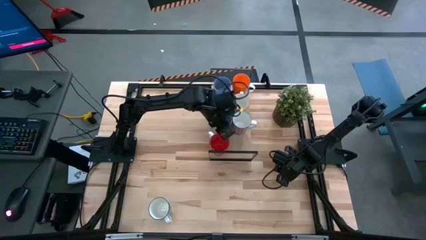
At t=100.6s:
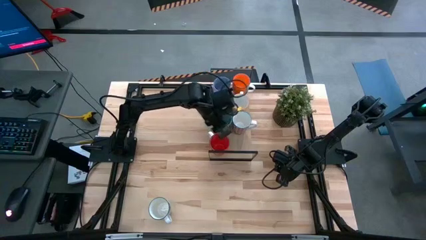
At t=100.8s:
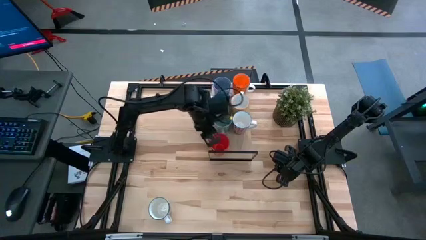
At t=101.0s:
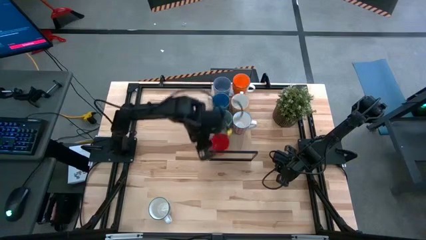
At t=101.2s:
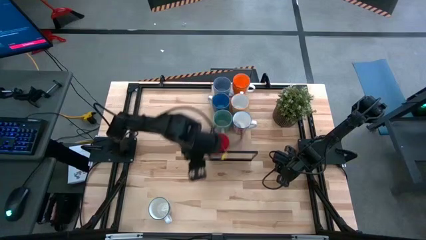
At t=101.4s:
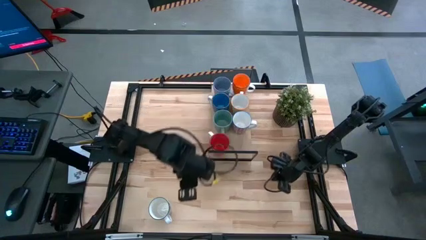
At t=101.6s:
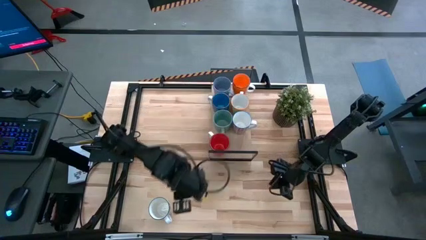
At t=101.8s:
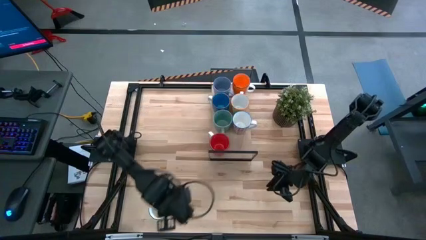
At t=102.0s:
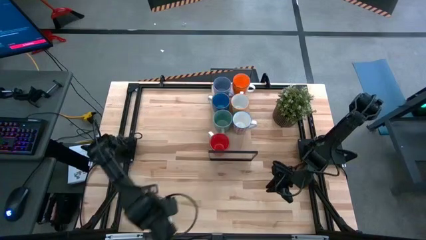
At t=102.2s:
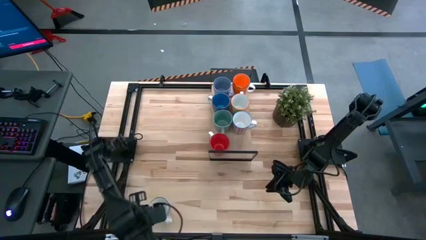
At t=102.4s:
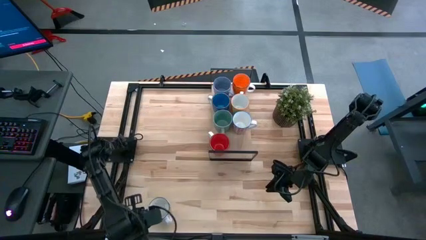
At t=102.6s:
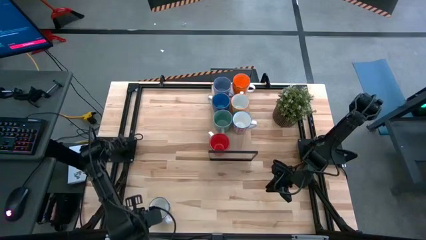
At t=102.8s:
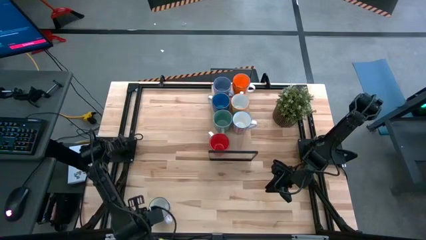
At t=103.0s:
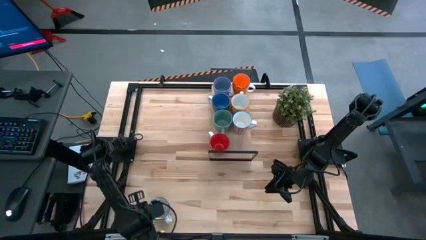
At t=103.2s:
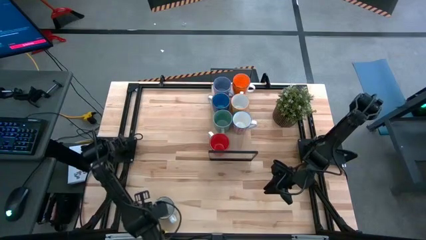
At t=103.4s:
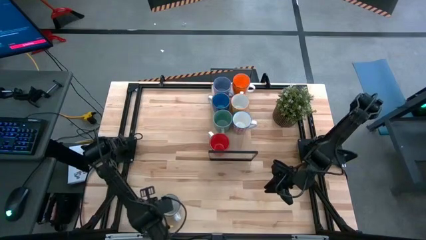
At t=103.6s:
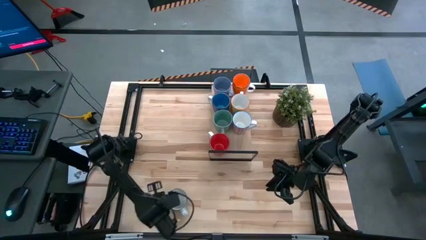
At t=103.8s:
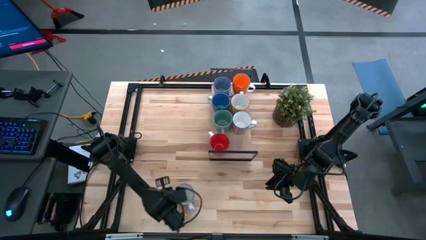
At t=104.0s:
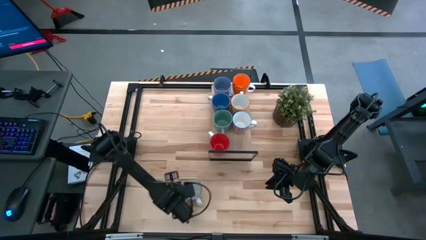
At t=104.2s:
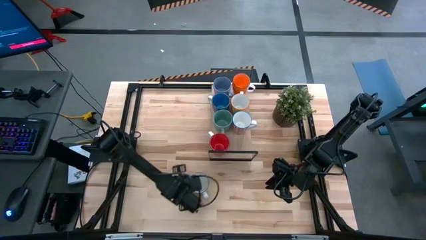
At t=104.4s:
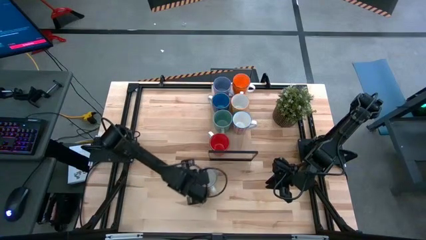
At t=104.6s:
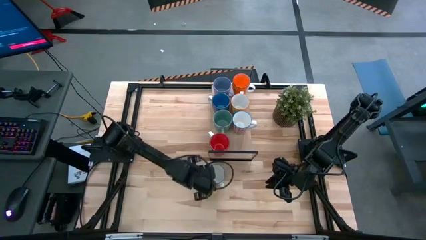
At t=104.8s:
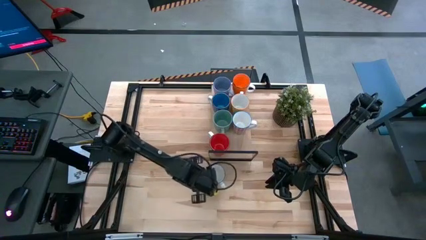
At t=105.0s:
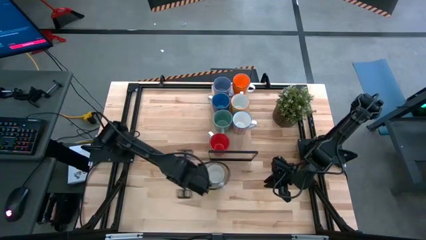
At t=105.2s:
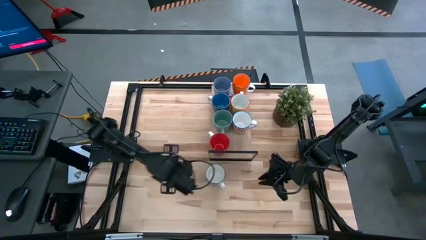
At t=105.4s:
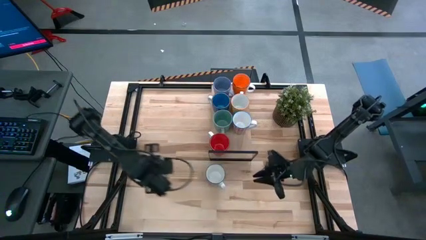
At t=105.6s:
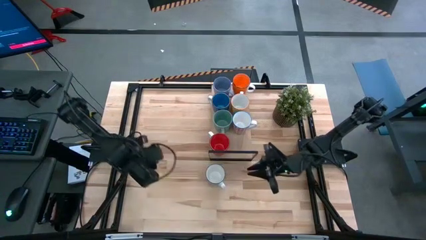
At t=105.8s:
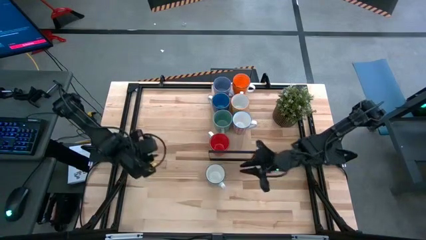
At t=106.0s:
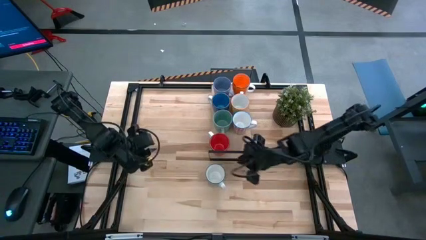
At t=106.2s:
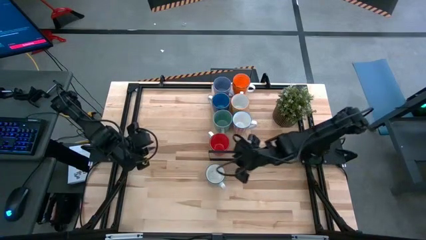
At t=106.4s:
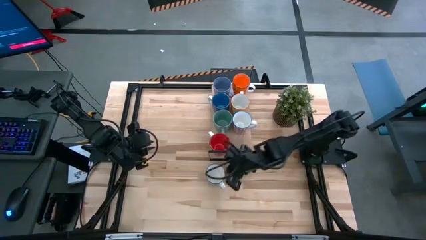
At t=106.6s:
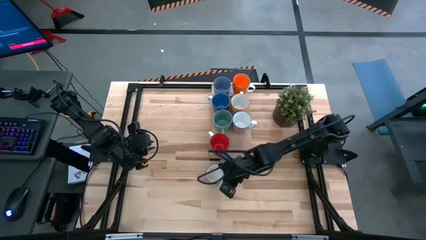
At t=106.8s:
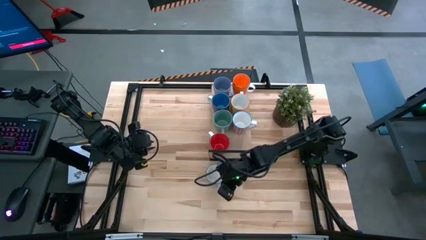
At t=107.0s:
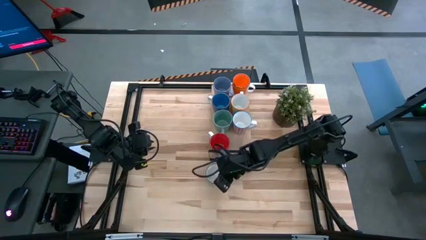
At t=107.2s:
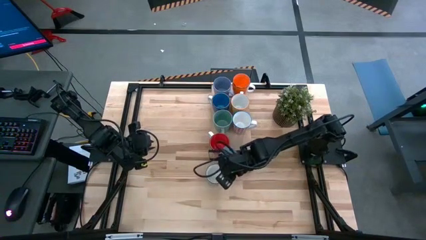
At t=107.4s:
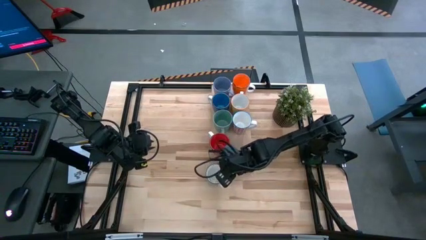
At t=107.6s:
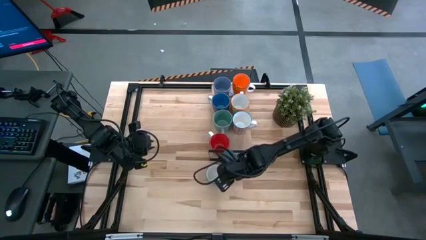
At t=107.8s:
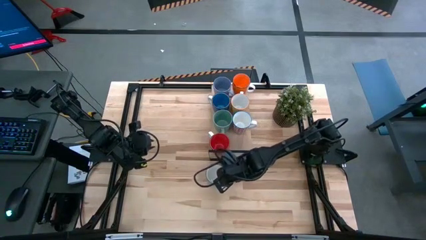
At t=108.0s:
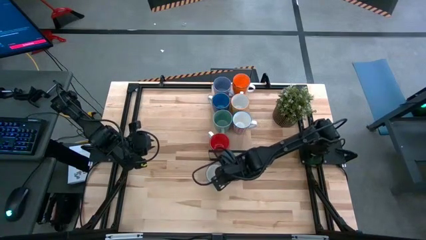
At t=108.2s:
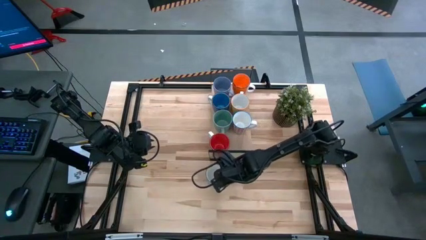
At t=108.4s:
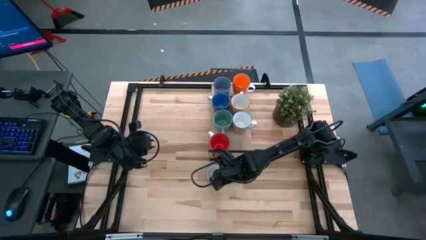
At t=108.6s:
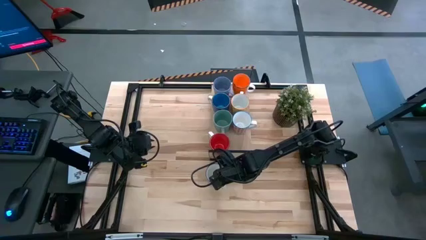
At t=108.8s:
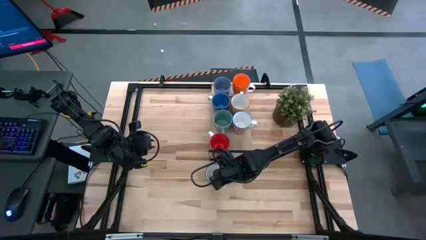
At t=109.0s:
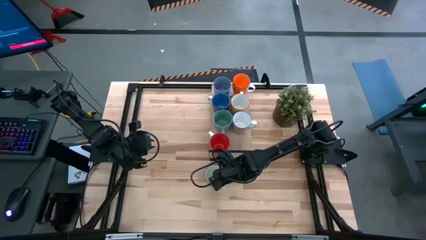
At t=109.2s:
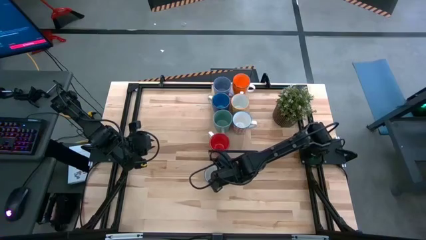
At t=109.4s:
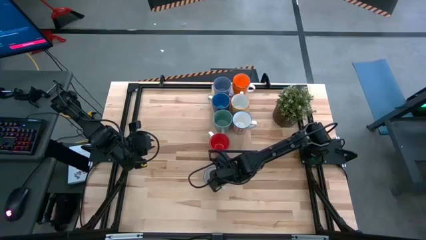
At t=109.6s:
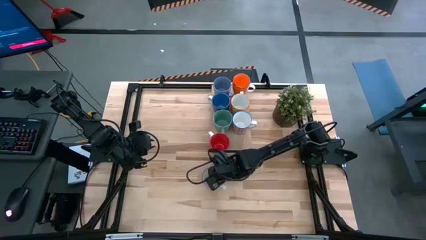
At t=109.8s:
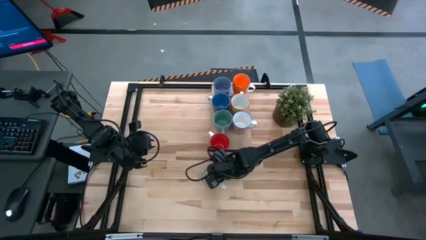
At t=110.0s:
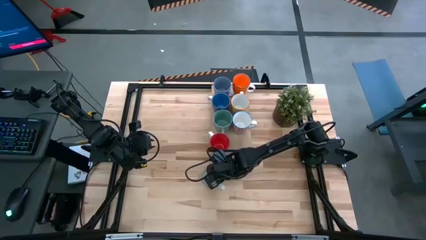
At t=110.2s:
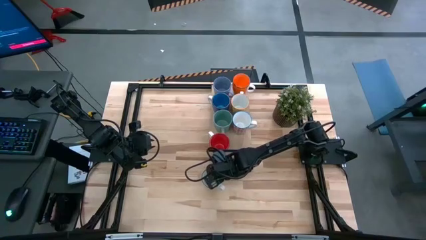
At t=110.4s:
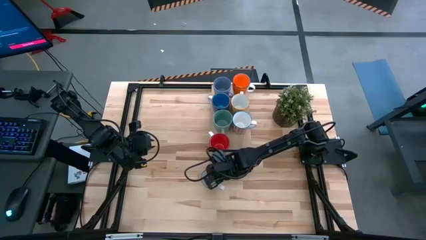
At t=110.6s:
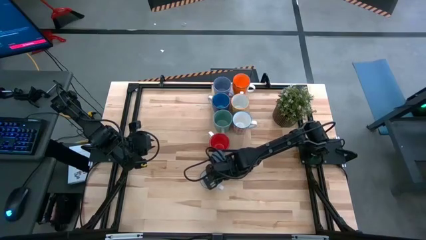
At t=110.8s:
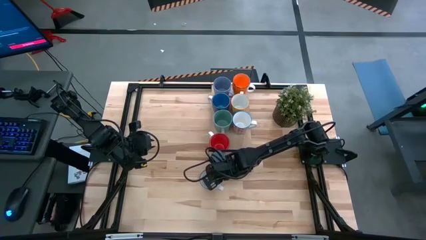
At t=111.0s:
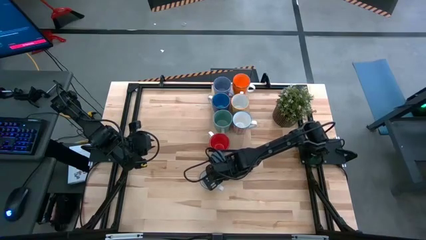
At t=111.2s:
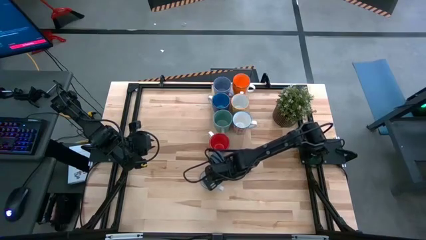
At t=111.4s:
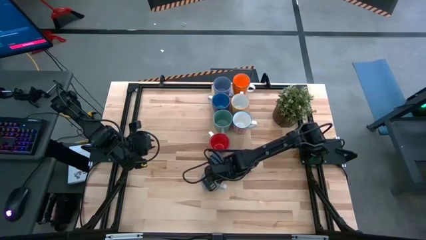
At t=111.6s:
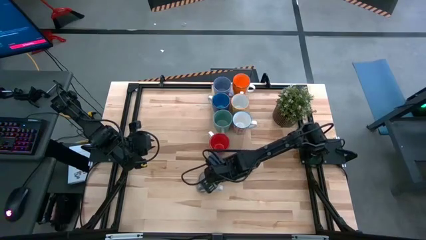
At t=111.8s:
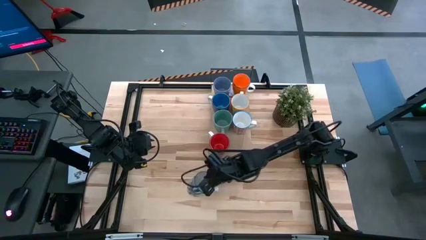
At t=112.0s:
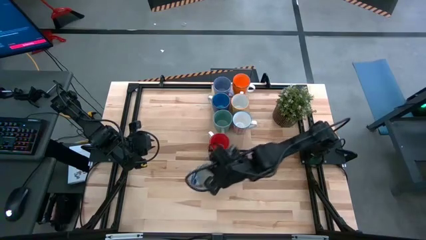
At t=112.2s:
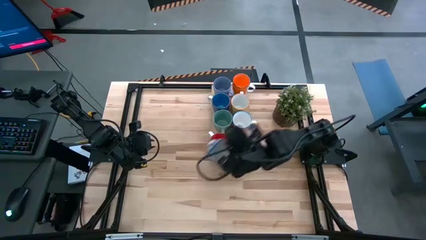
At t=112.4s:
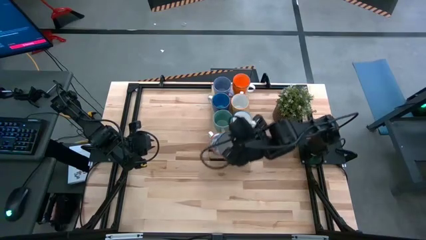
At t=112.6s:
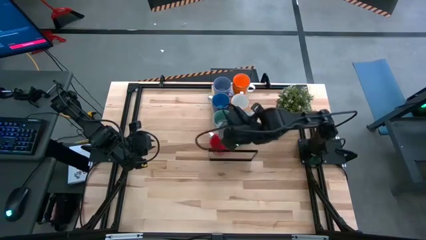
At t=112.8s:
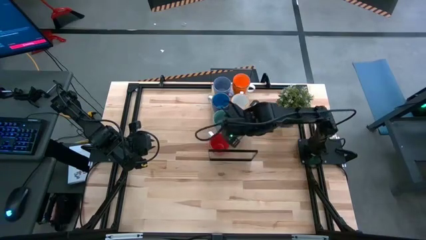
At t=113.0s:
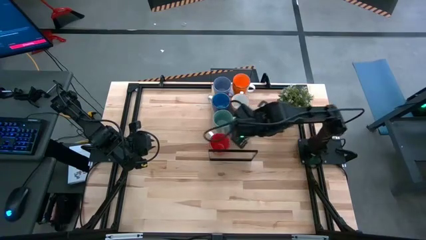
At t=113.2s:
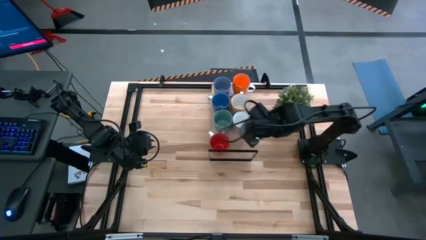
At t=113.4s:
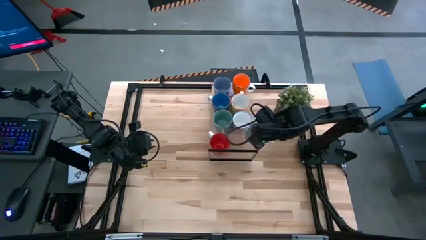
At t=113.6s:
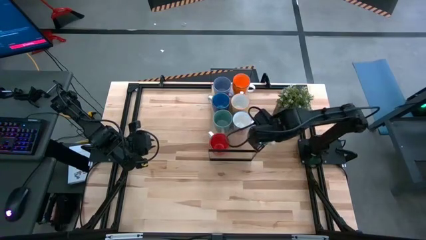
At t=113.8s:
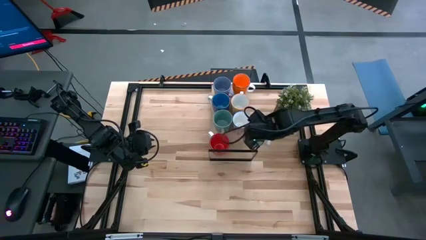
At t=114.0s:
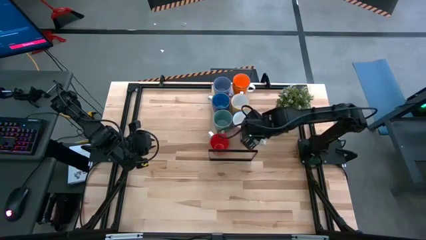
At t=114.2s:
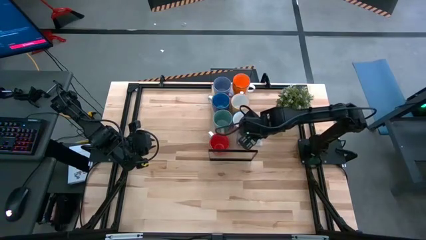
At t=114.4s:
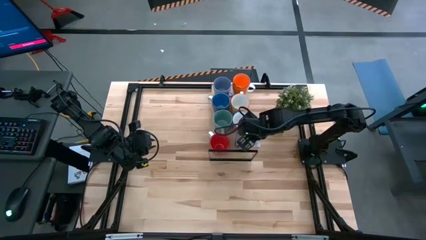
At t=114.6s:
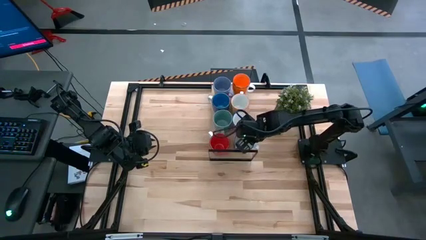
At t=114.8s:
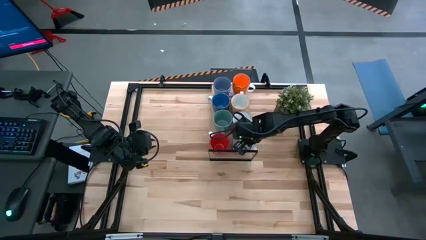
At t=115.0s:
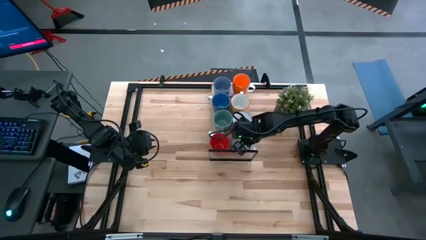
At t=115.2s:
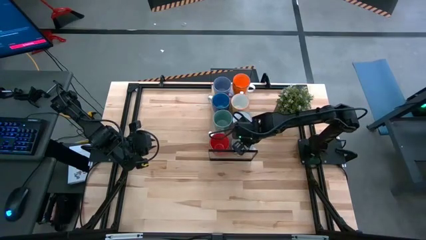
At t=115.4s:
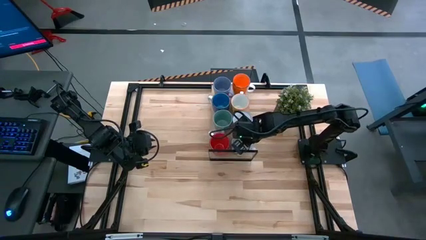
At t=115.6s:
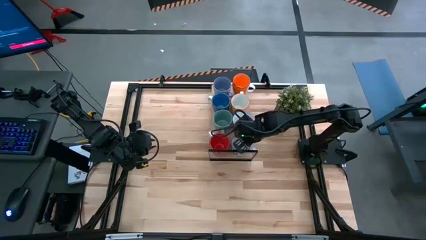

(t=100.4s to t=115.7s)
Task: Place coffee mugs
Put the blue patterned mug on the shelf next to the red patterned mug

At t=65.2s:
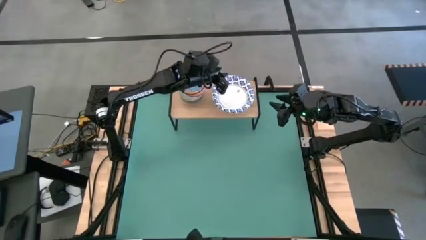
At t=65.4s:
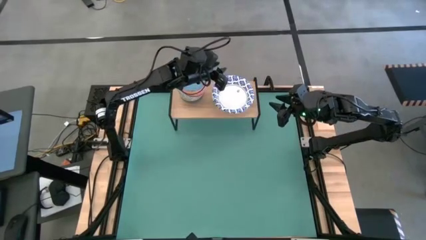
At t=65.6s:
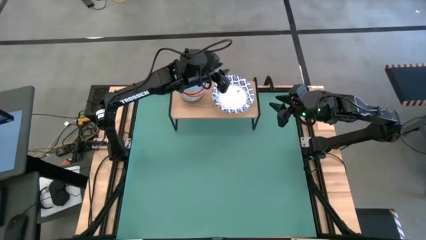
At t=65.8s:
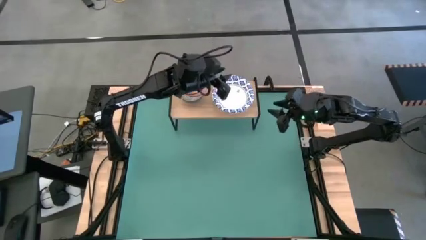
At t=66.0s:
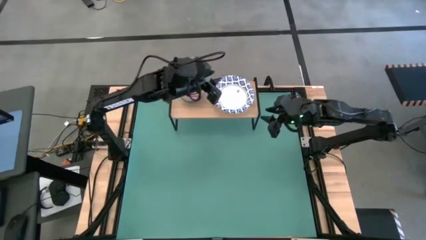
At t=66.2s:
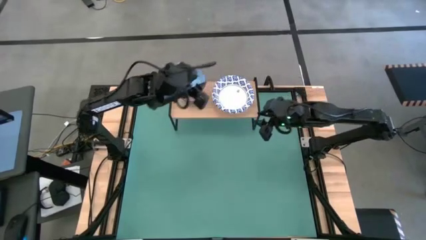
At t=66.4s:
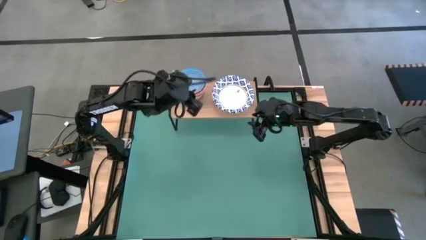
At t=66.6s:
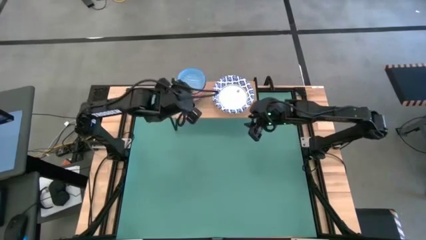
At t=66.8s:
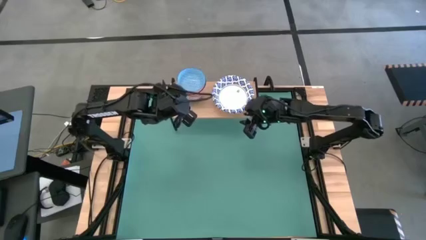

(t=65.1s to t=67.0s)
Task: Place and stack bowls onto a shelf
Adjust the stacked white bowls on the shelf
